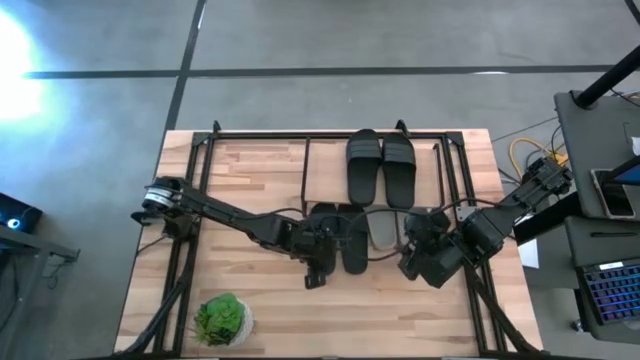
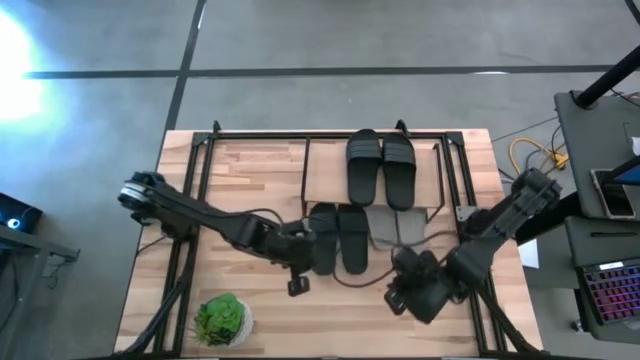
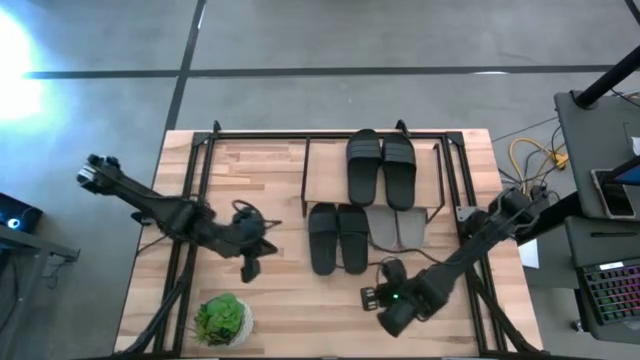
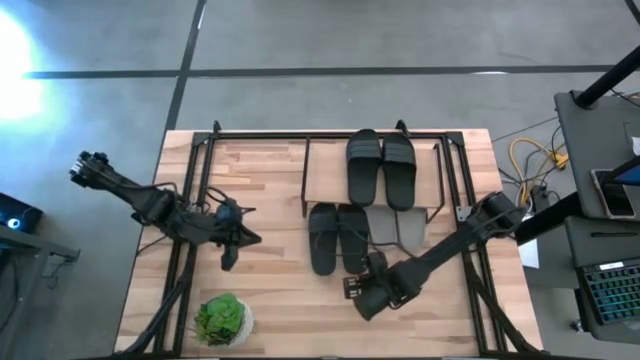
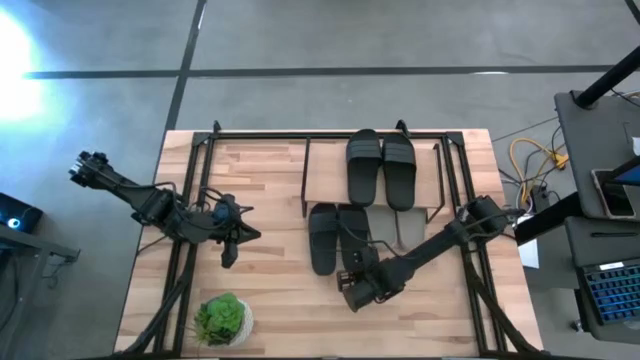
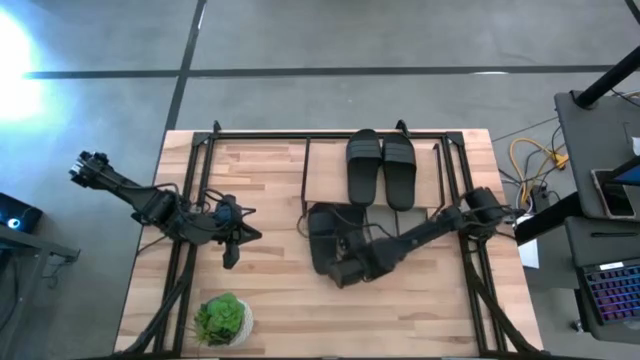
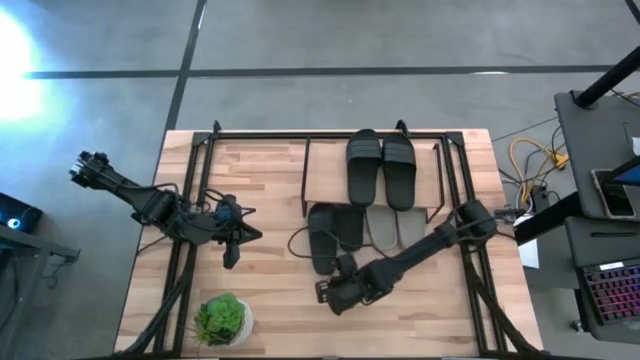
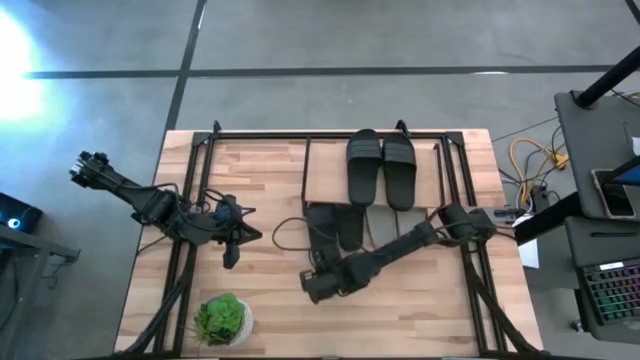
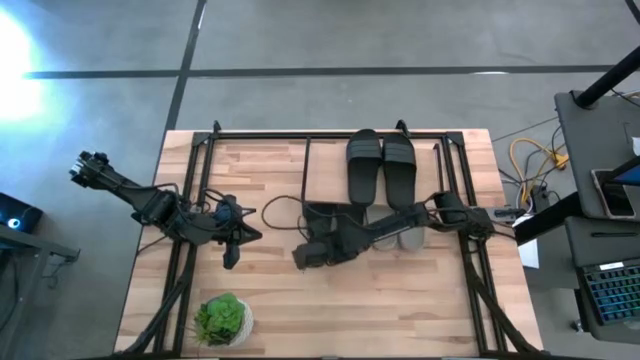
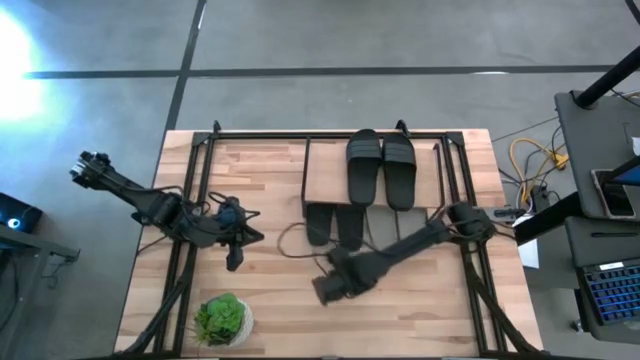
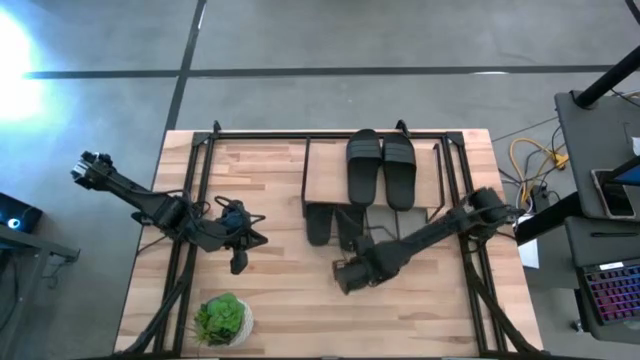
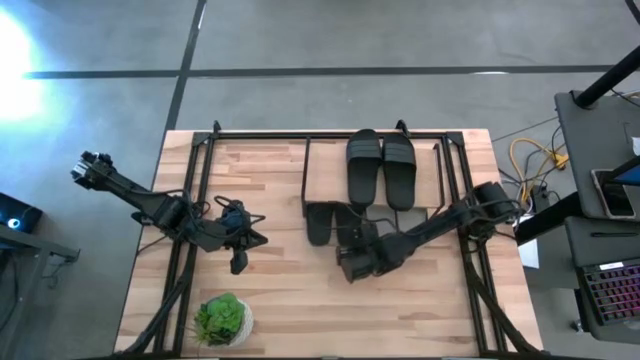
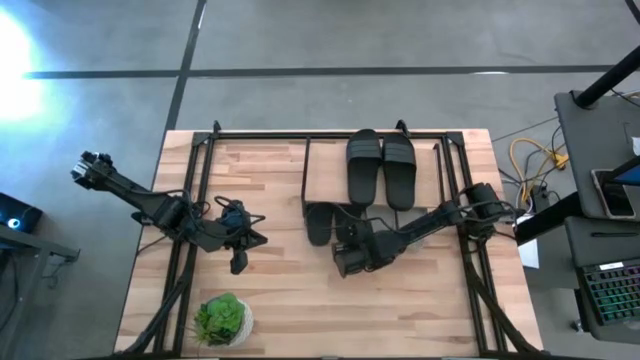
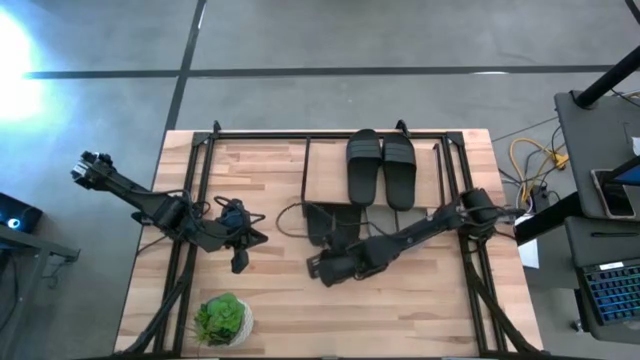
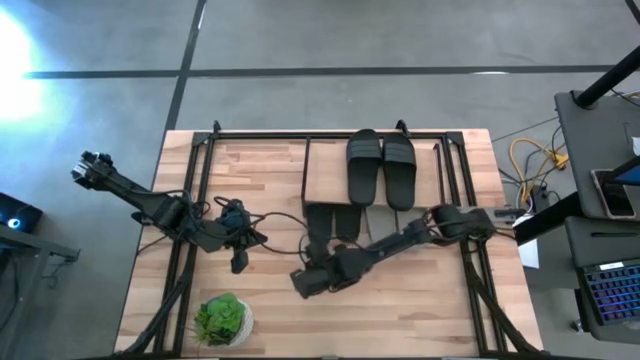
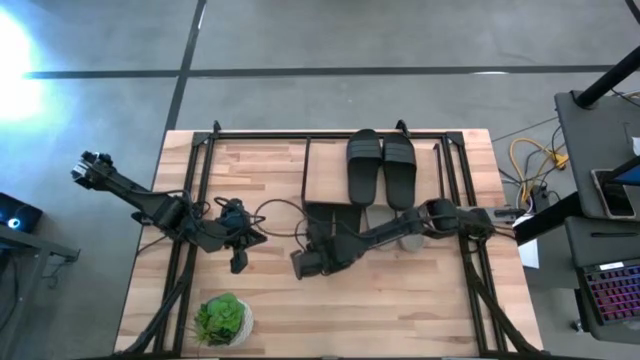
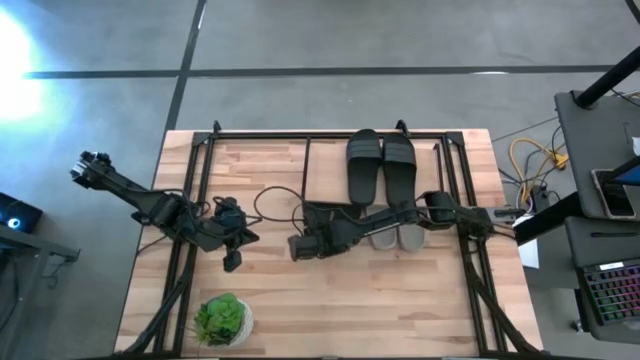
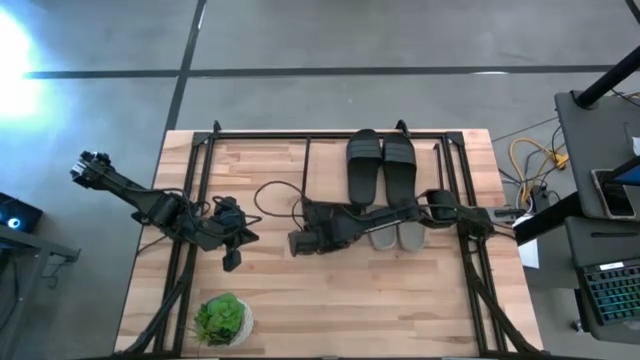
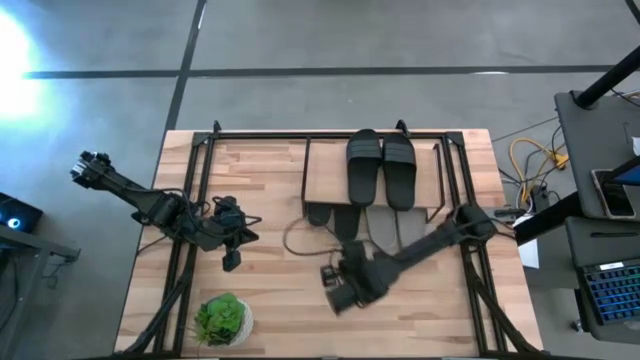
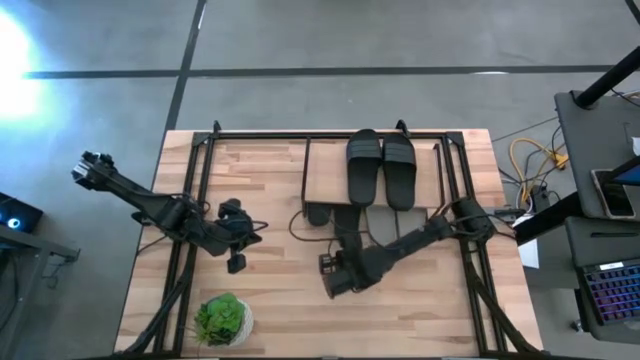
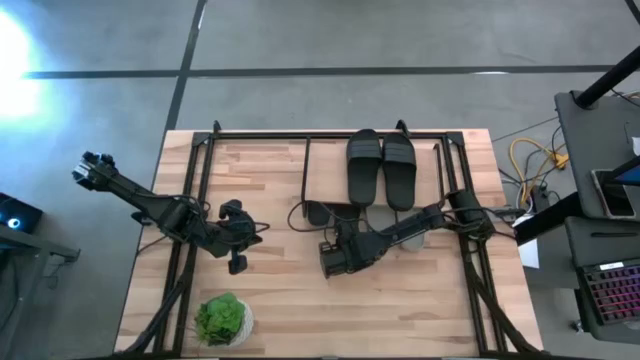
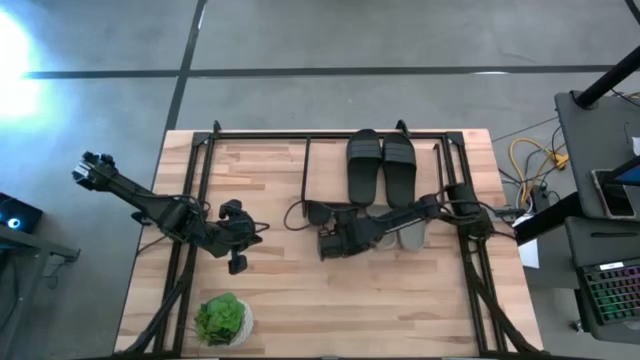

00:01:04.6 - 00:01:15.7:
Task: Pick and place slides into the shelf
Adjust the black slide under the shelf

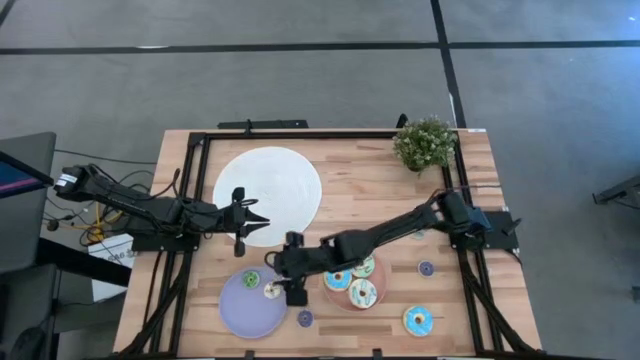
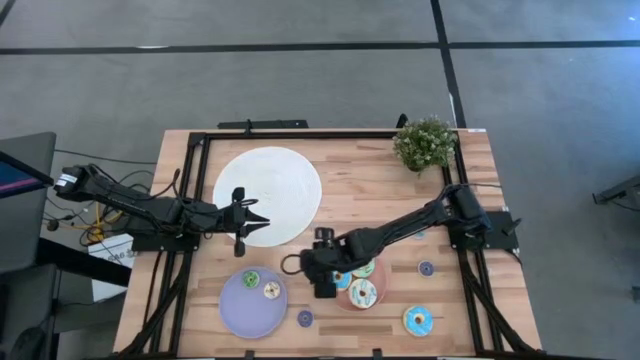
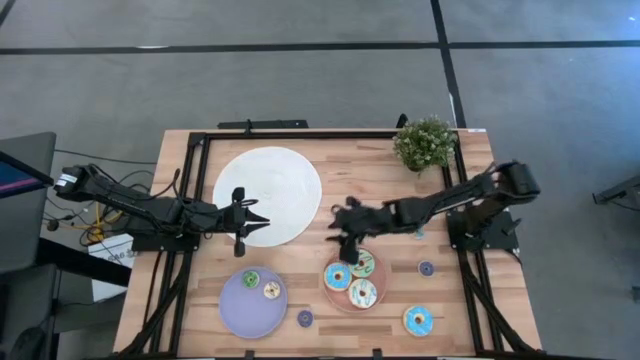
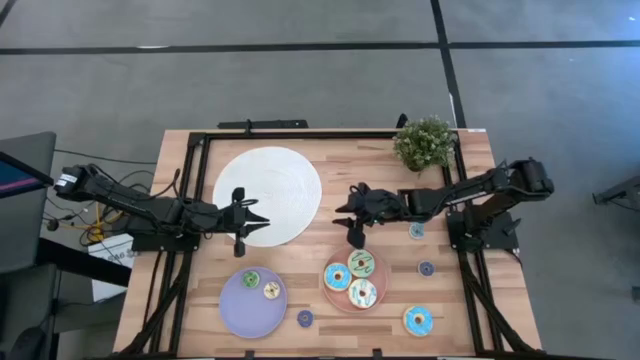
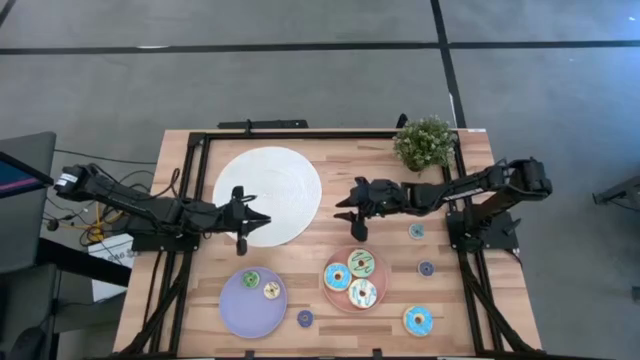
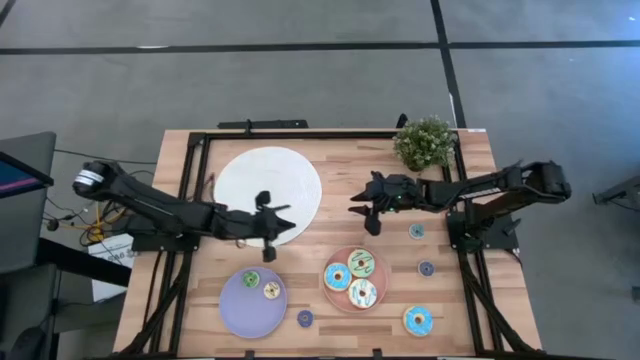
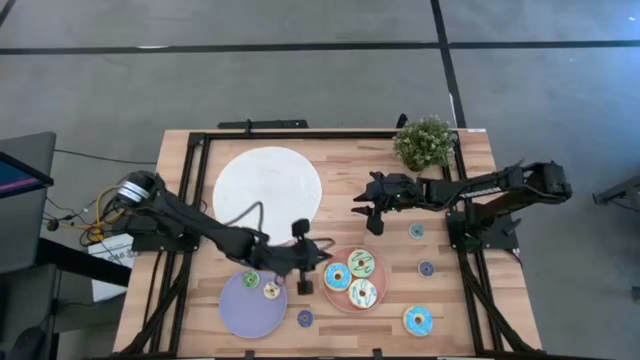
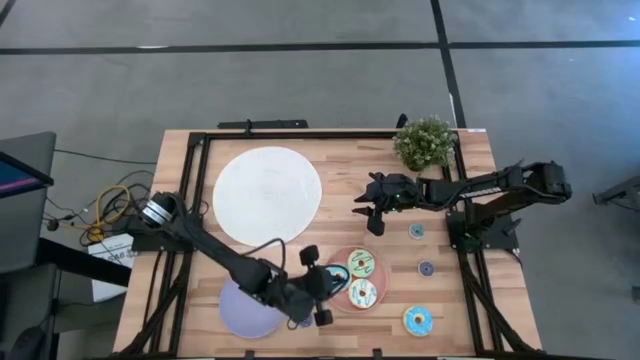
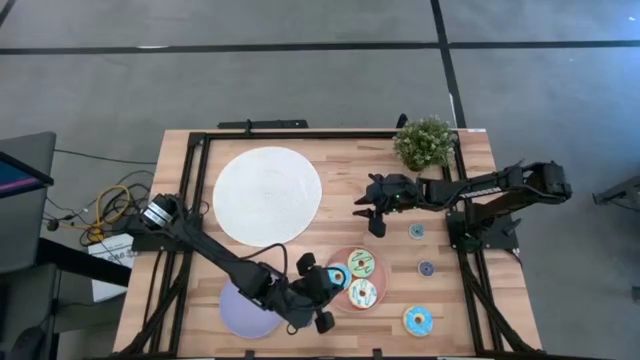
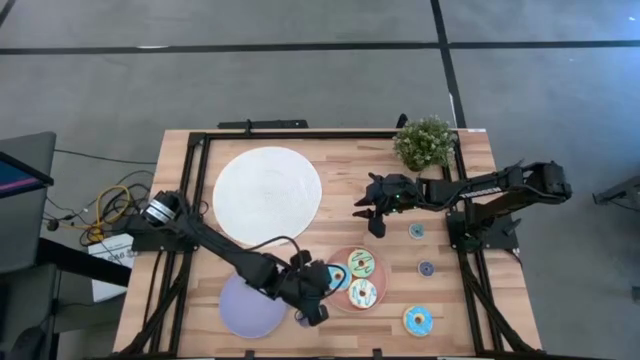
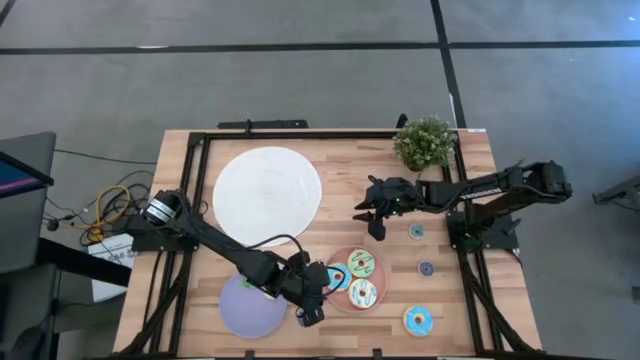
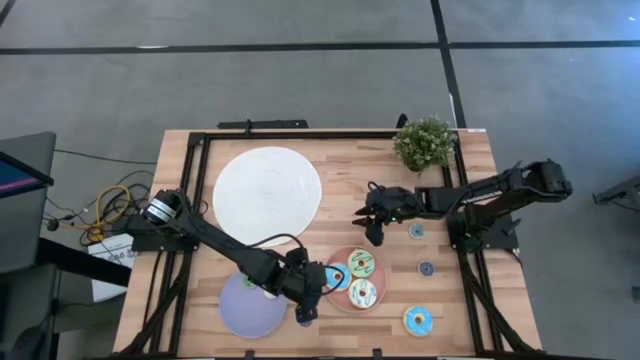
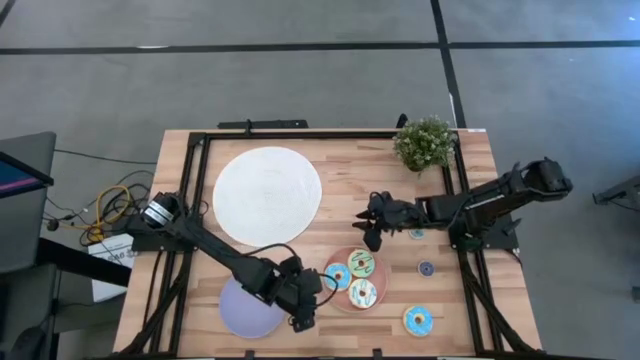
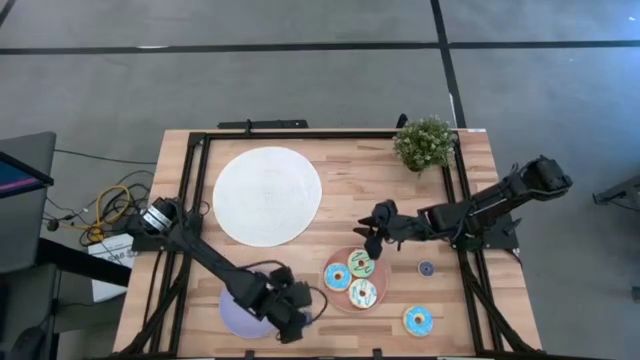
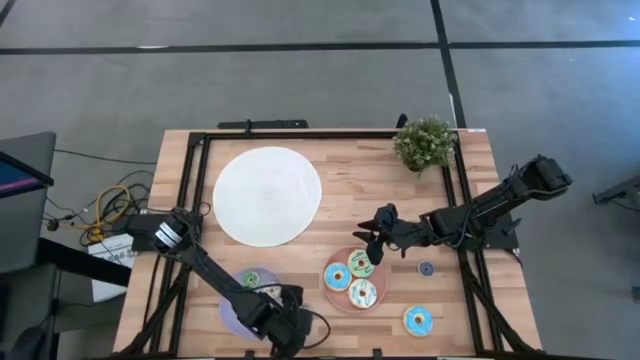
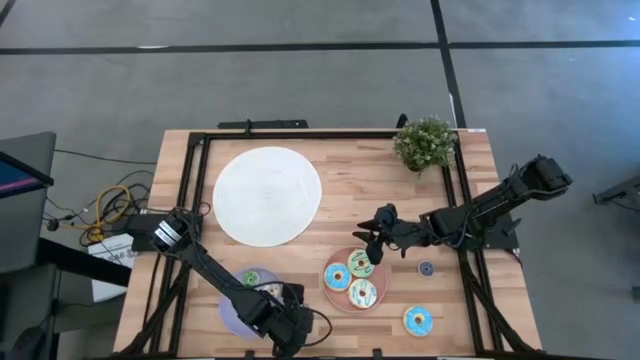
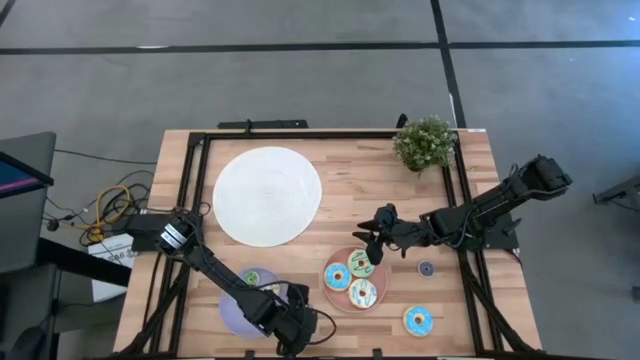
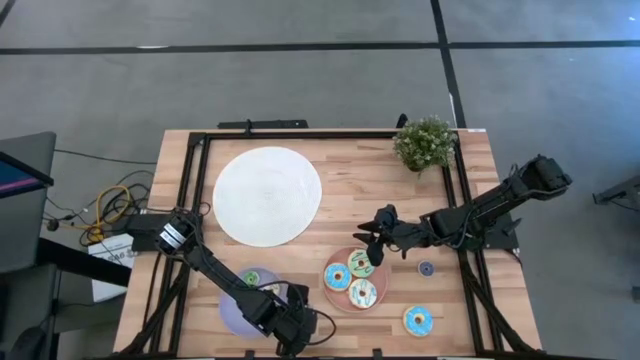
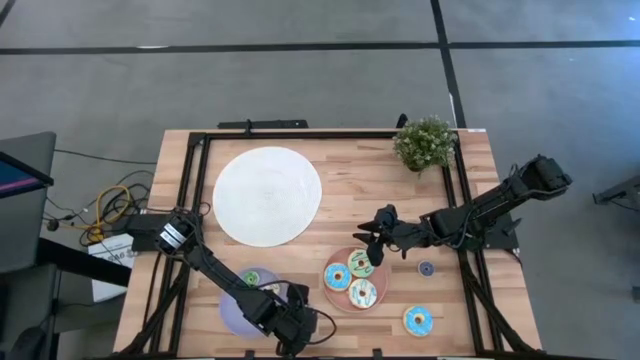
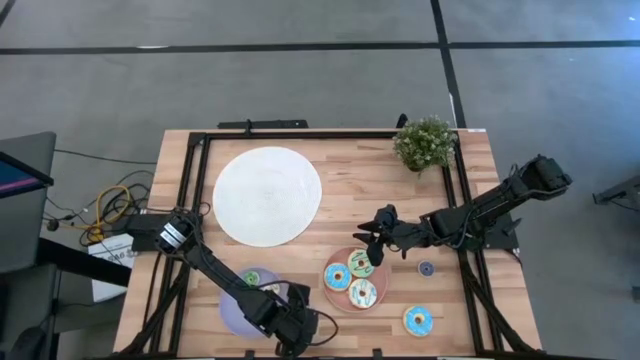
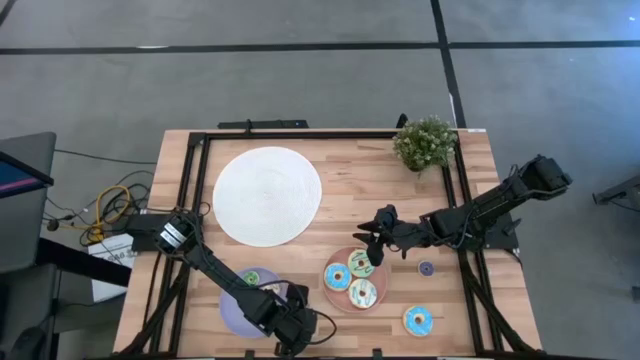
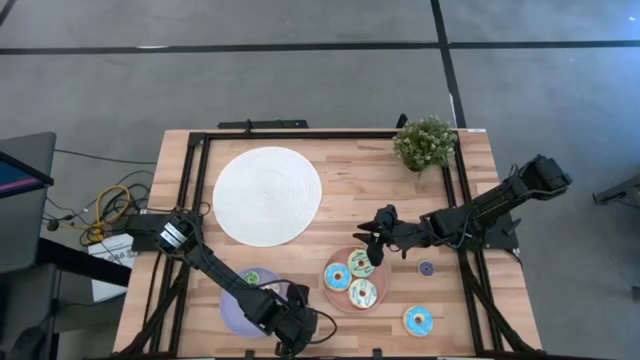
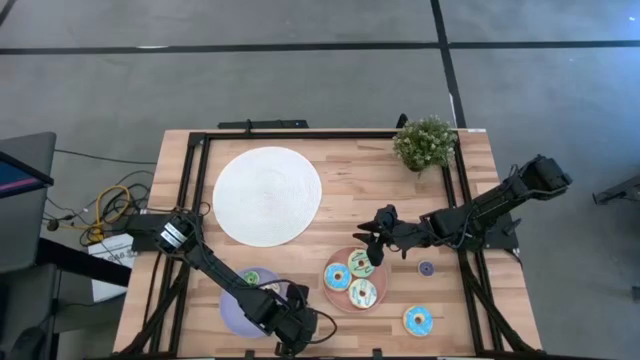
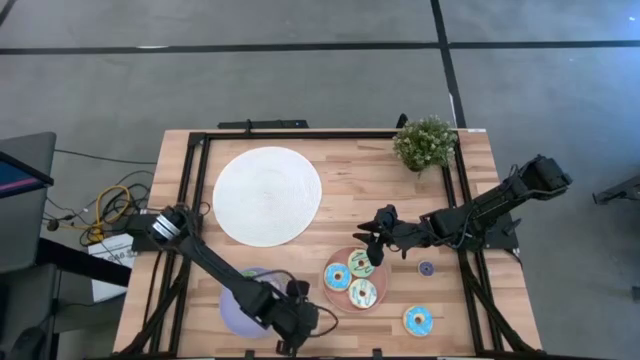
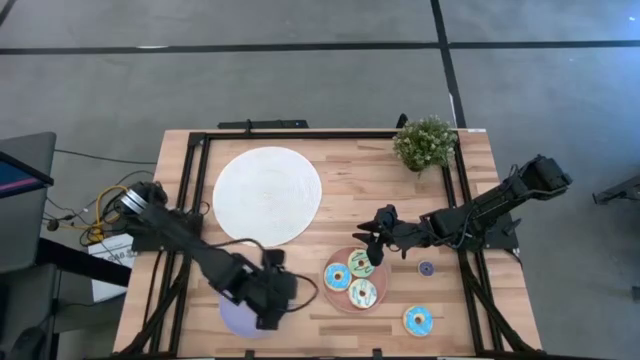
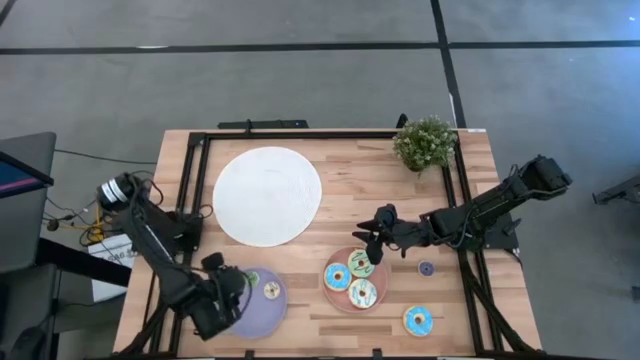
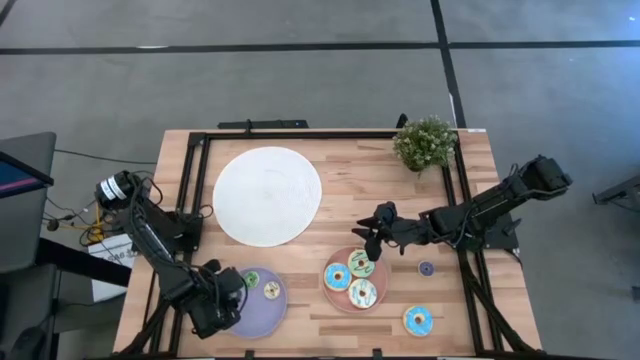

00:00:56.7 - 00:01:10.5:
Task: Pick & Place donuts
Put the bottom small blue donut on the purple plate
